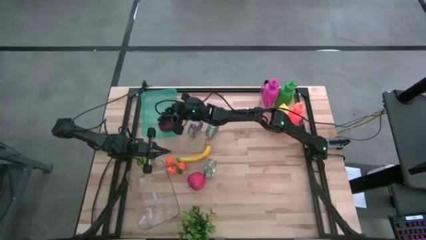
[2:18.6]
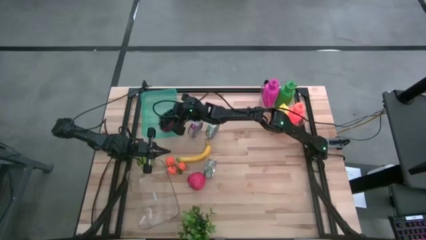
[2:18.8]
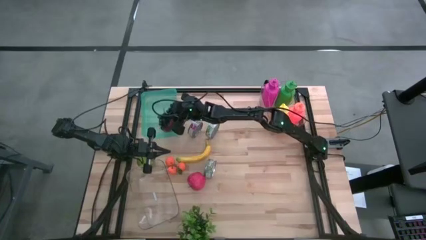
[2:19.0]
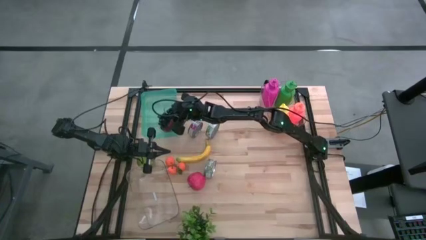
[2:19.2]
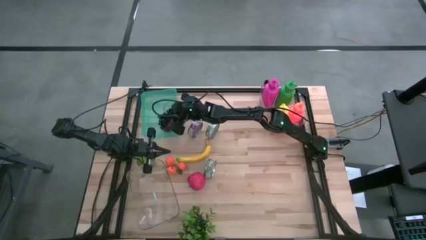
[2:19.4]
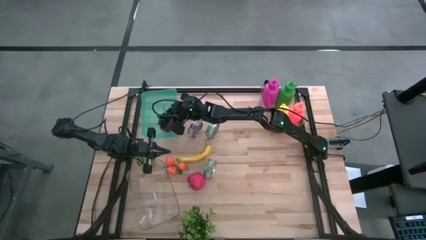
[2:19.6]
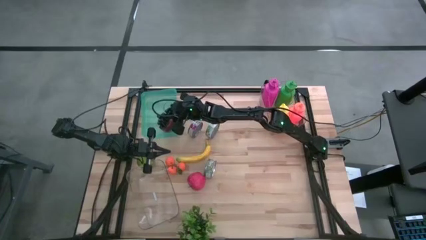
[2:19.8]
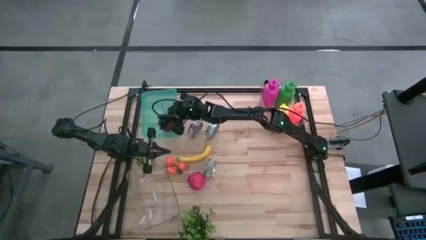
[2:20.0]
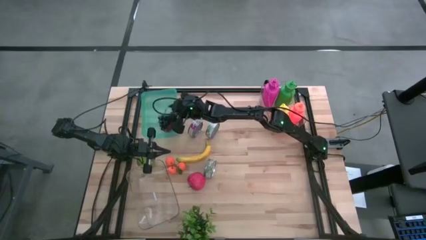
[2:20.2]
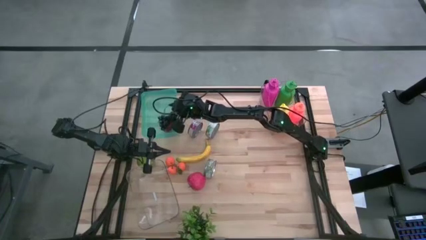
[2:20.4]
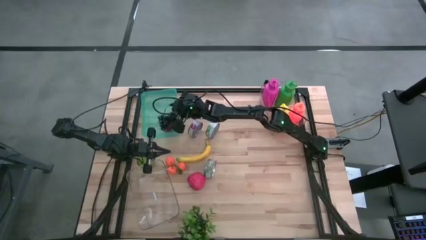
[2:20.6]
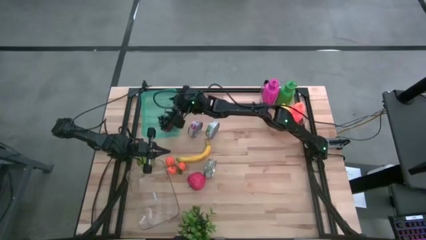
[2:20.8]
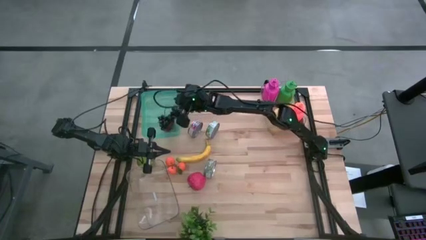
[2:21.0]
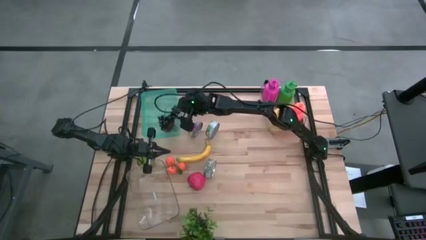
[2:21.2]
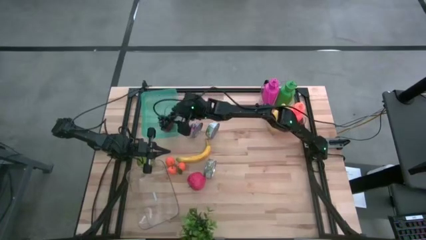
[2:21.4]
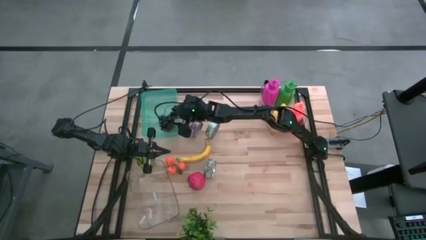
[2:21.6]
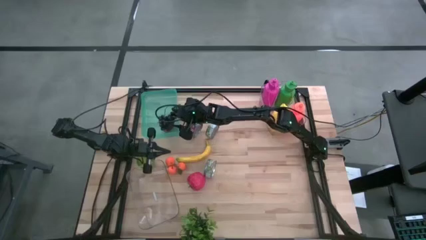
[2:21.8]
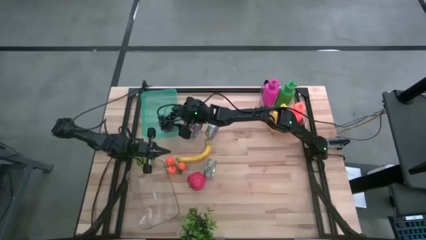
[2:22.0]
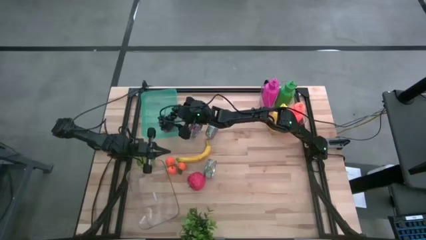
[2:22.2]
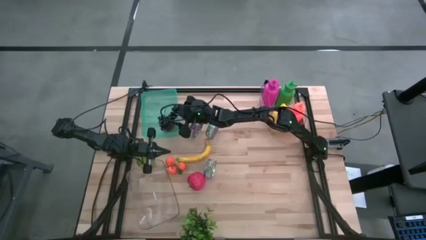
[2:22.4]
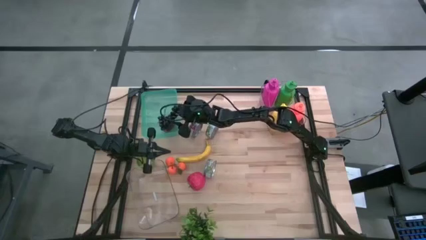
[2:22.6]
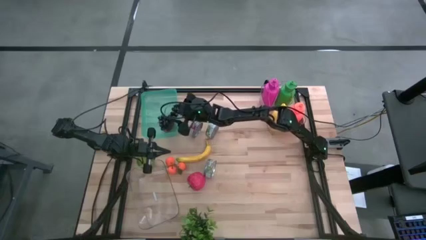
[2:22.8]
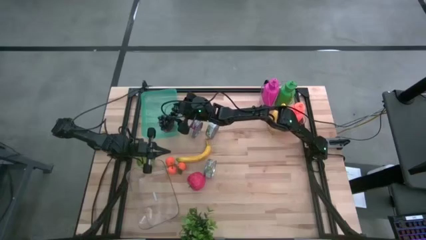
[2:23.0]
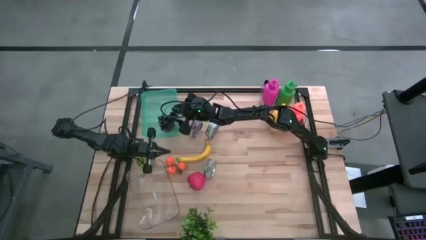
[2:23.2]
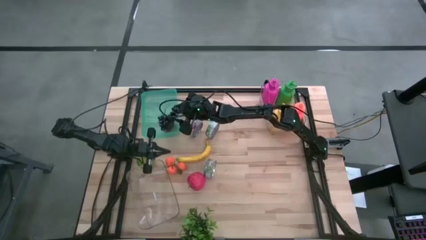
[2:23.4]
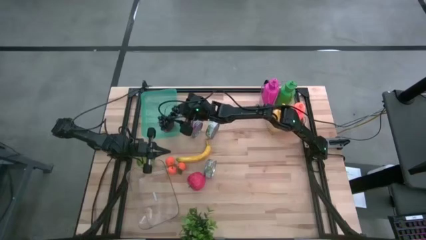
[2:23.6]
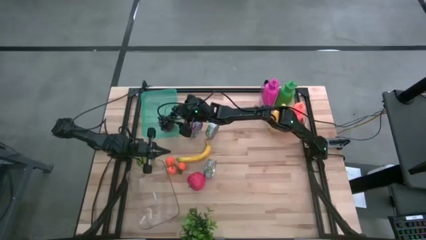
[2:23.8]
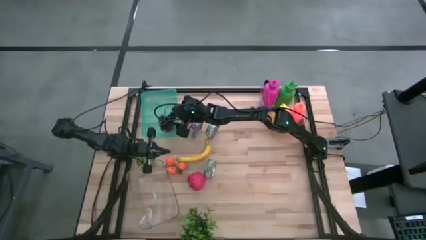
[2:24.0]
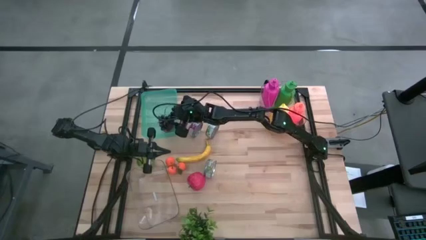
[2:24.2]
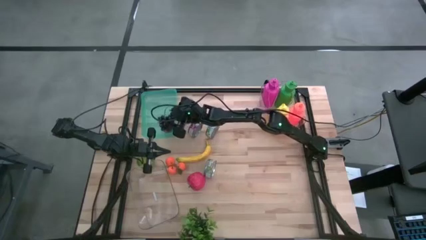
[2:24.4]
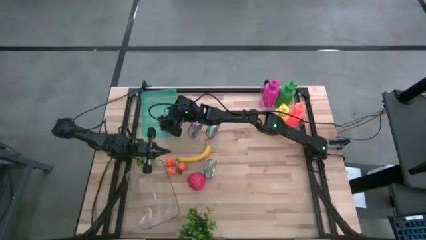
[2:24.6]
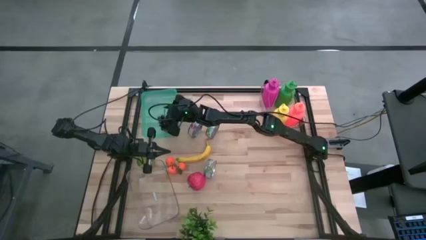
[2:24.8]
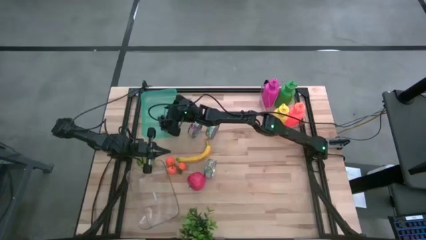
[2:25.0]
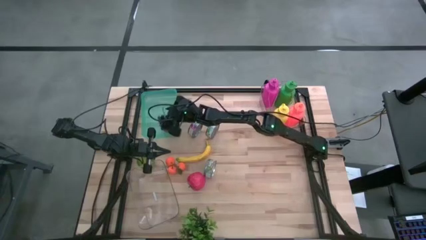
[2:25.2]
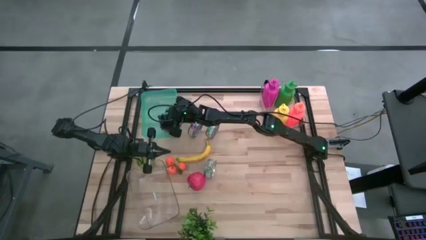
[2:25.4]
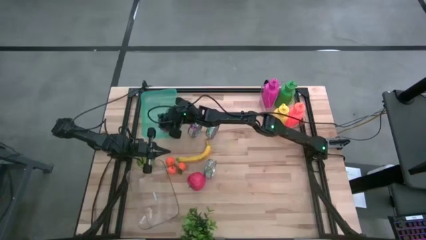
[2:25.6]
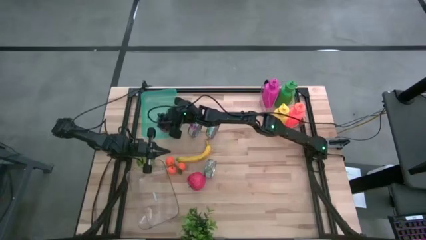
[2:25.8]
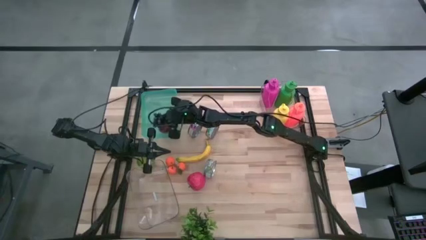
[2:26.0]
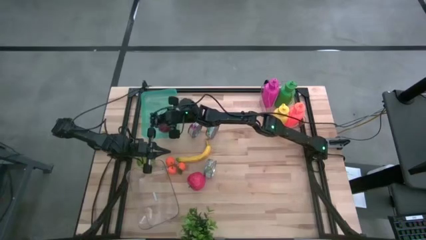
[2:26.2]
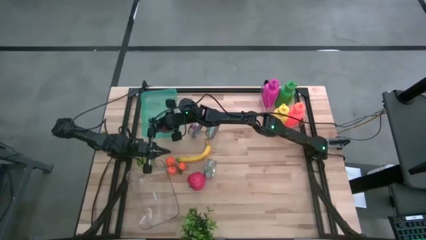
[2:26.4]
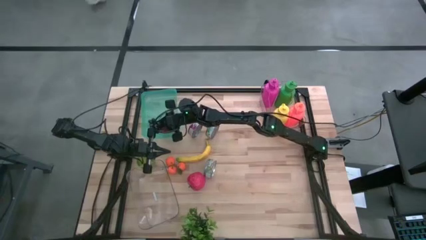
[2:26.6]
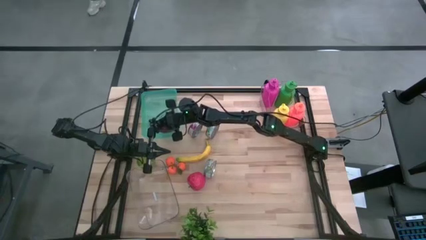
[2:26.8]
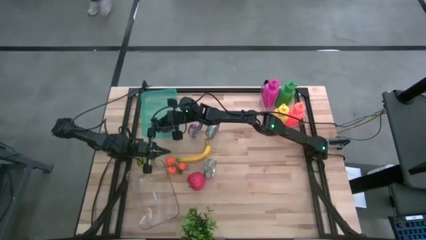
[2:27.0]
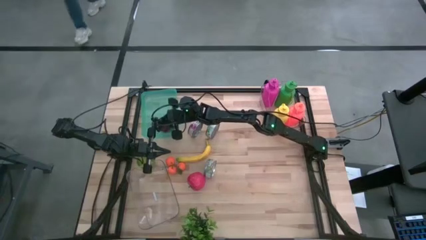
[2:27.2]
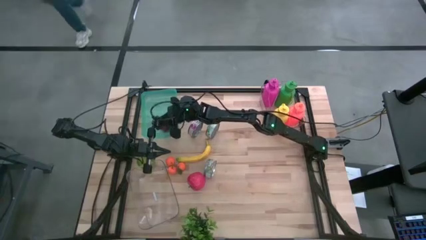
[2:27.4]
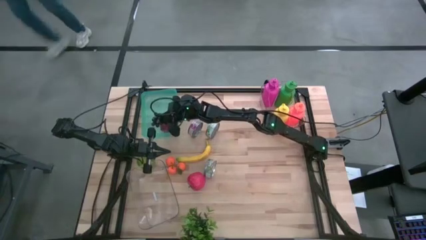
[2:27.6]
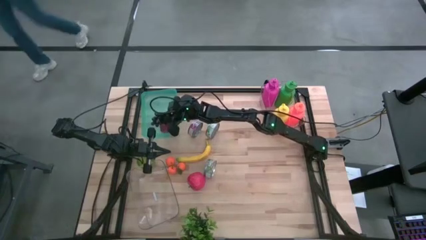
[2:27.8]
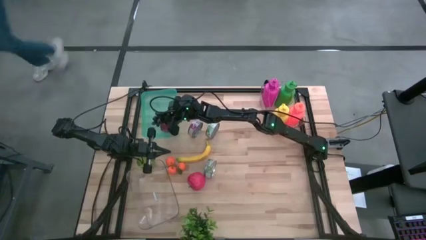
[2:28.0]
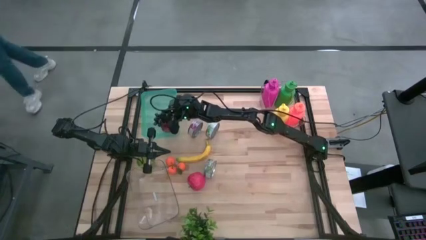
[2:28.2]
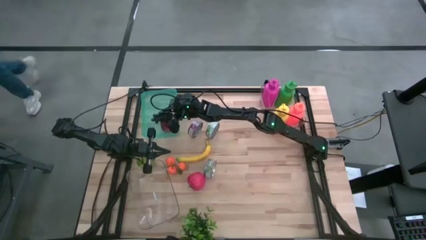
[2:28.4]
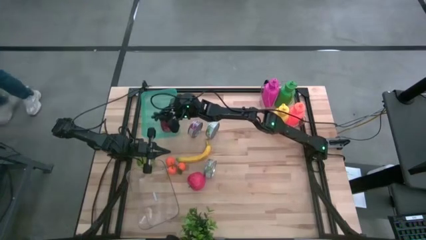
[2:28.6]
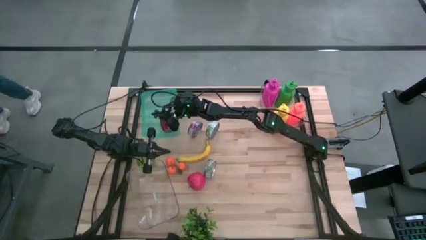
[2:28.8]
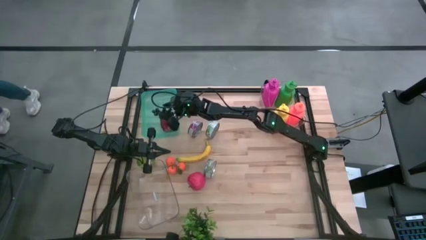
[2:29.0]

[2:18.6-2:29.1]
Task: Pick & Place Food Item
Put the grapes into the green bin
